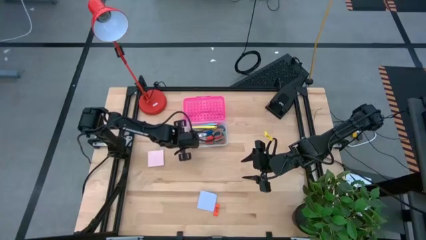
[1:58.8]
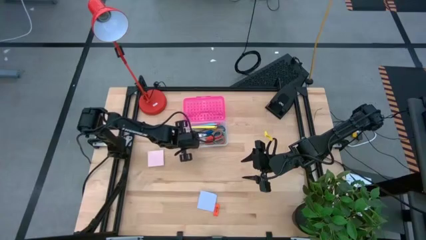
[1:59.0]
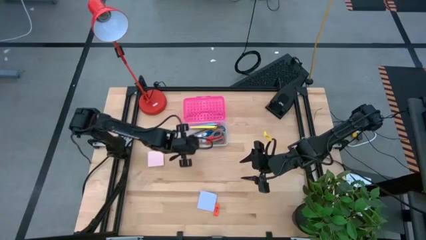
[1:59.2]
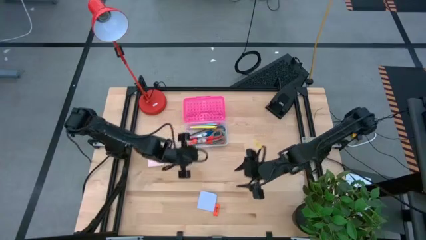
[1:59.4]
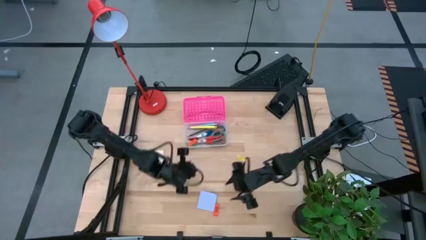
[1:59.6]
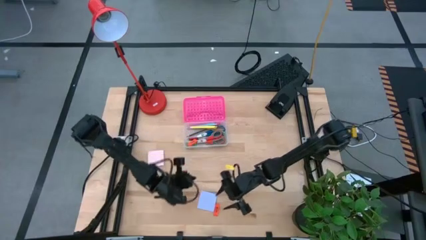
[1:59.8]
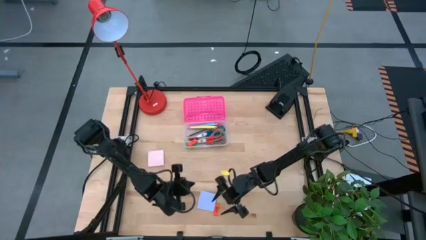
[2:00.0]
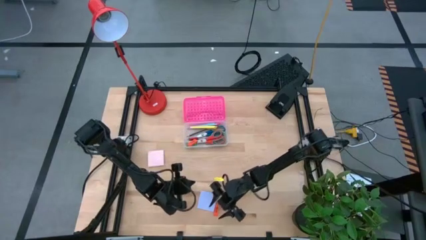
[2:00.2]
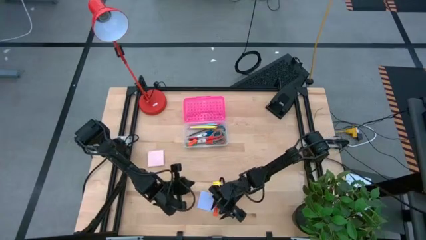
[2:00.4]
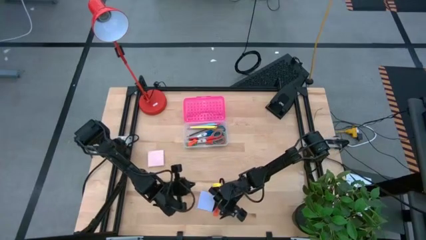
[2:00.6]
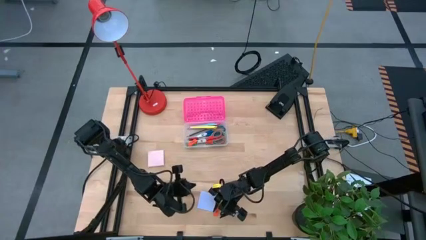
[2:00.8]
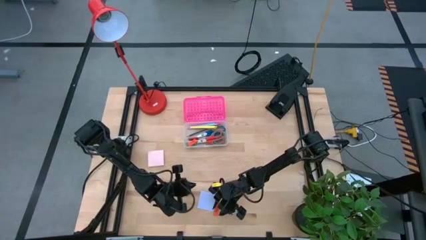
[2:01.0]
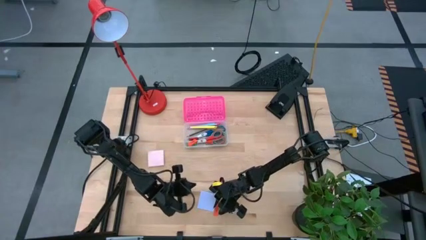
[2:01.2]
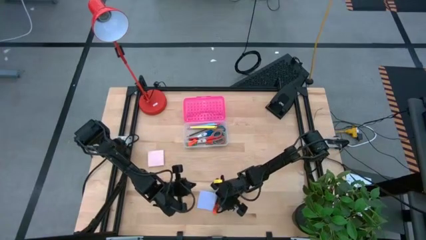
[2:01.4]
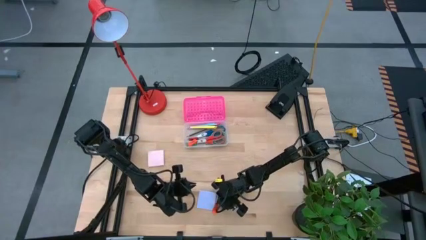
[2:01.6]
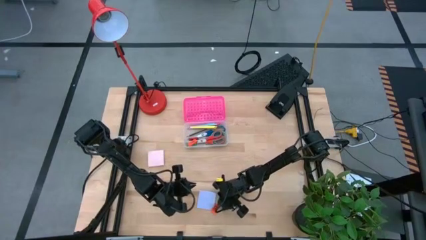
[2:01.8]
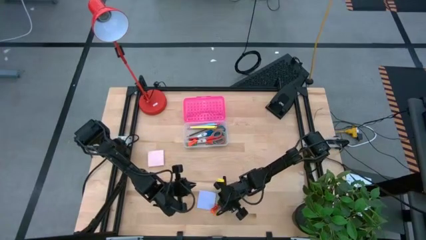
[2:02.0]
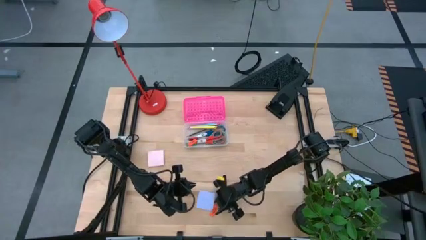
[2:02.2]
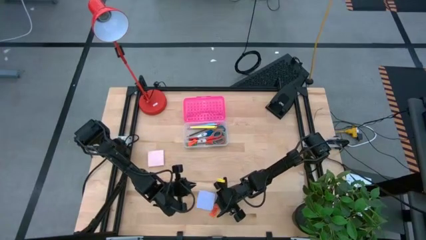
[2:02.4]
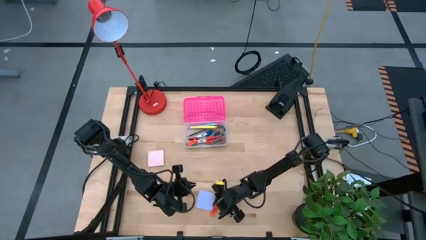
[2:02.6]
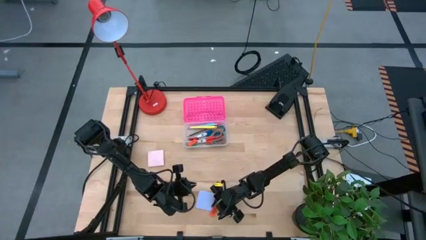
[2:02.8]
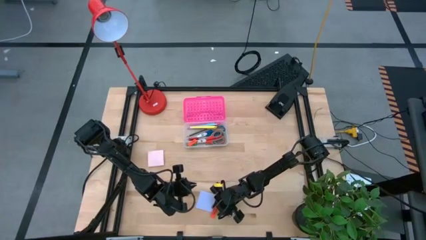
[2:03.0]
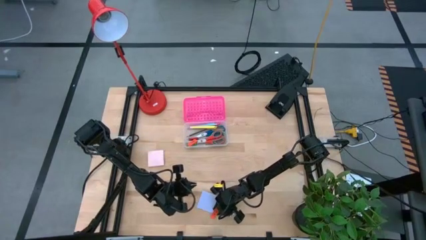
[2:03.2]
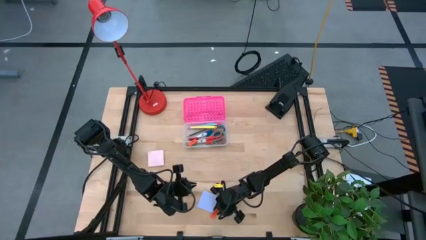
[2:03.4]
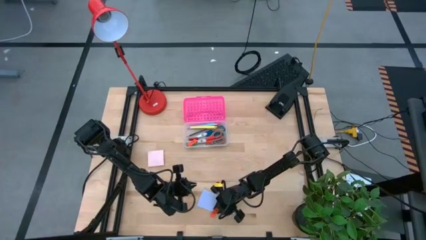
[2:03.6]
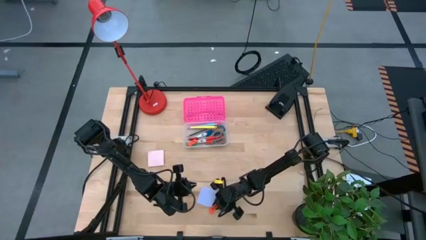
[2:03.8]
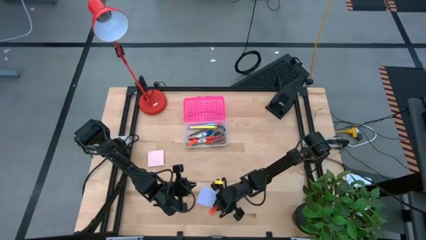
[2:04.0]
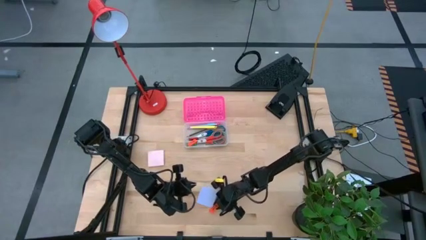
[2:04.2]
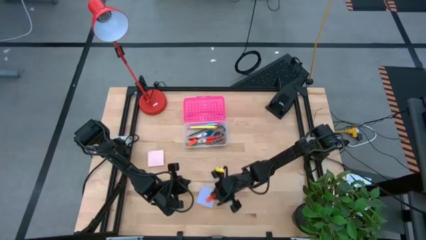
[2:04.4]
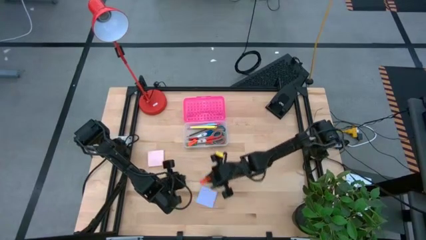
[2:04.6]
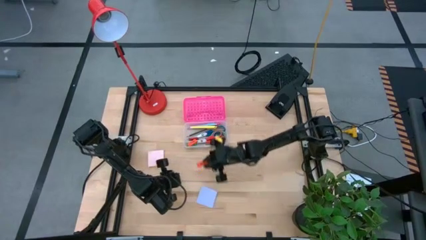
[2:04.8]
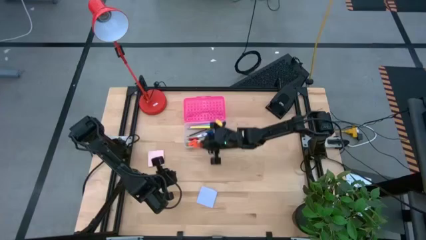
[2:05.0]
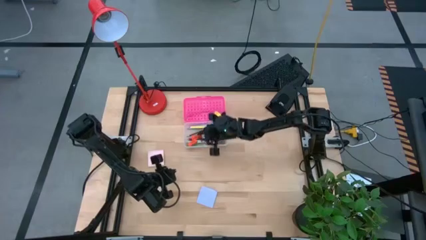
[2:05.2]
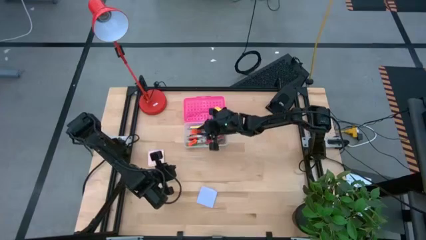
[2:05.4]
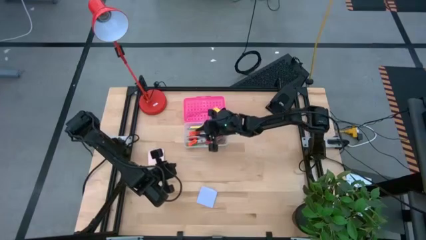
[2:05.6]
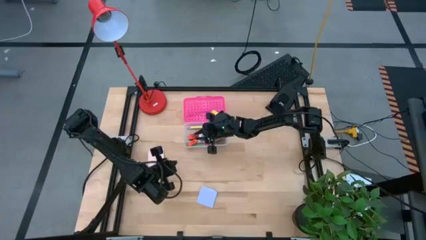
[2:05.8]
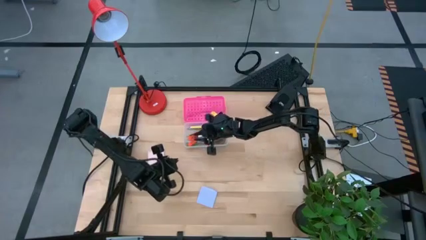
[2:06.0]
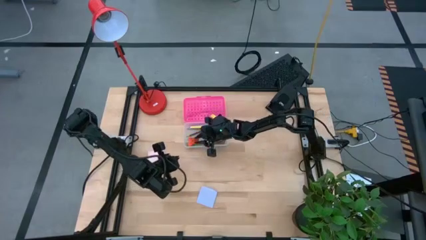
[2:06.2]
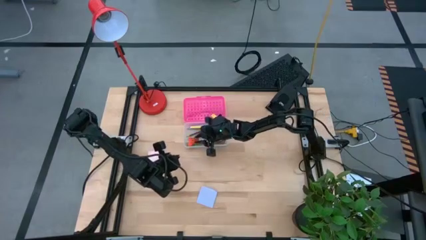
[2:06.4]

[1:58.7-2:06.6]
Task: Pack school essentials
Put the orange eraser into the pink supply box

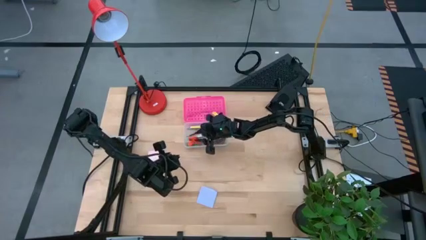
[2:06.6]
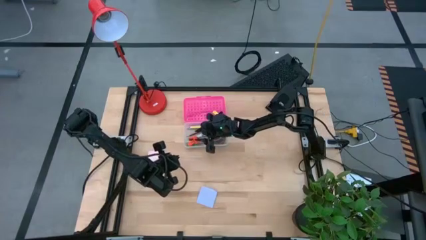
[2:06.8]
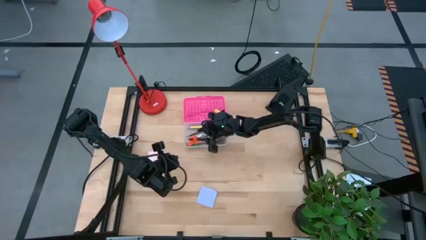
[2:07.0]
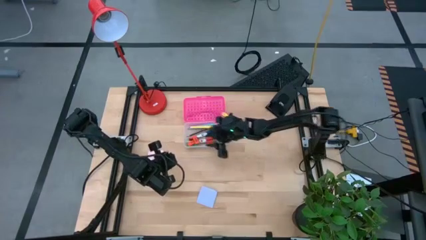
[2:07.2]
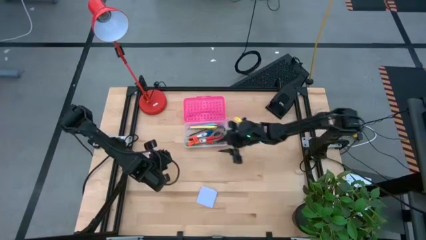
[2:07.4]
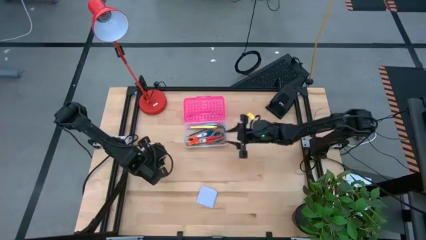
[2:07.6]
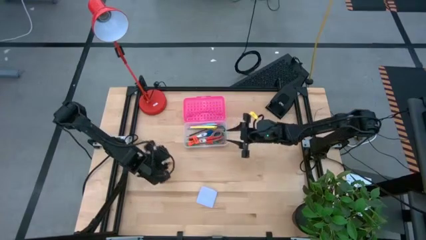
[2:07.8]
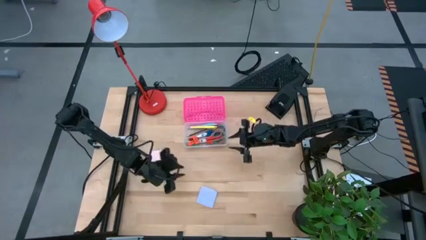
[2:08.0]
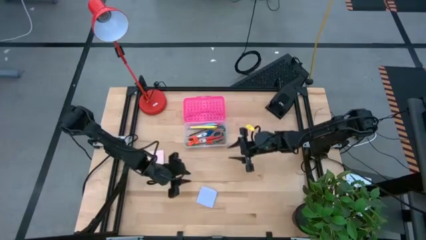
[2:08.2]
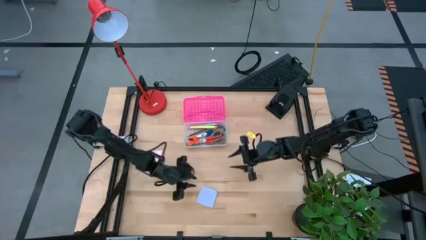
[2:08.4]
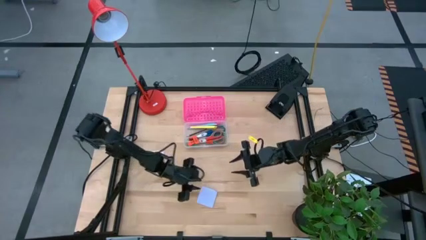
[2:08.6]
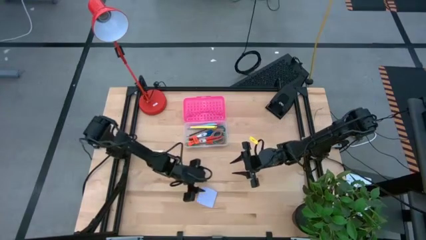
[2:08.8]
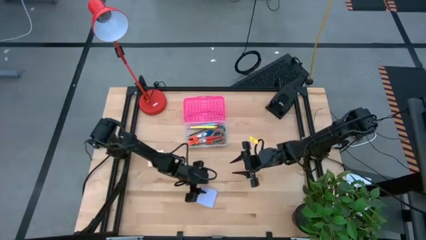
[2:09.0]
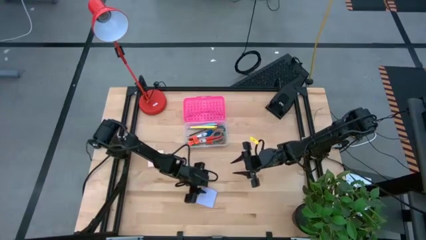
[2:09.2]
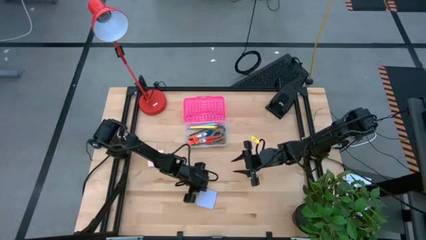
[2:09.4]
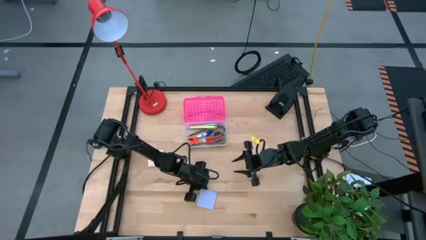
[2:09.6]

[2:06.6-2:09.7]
Put the blue sticky note into the pink supply box
